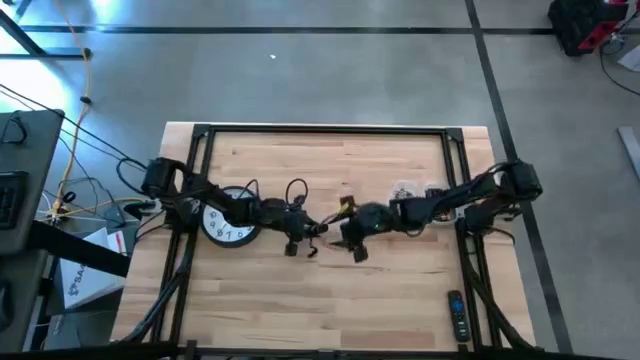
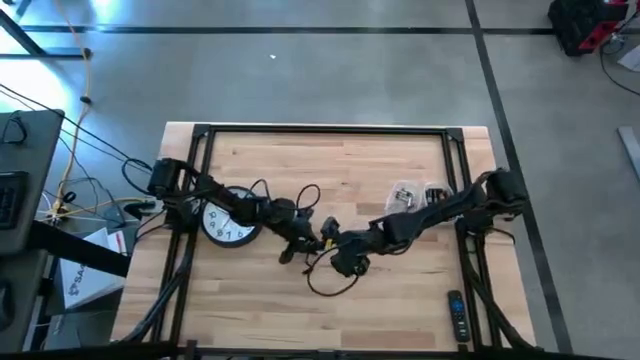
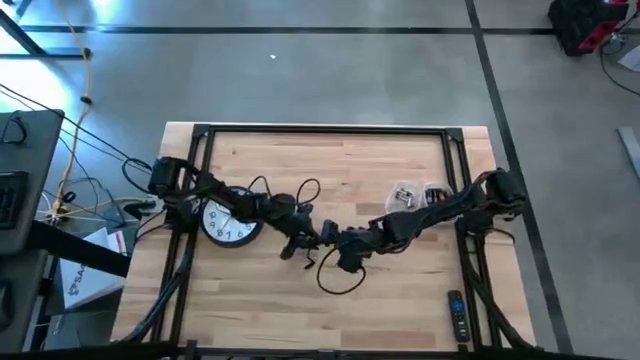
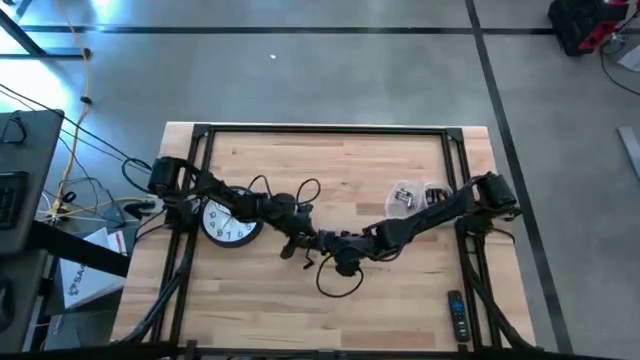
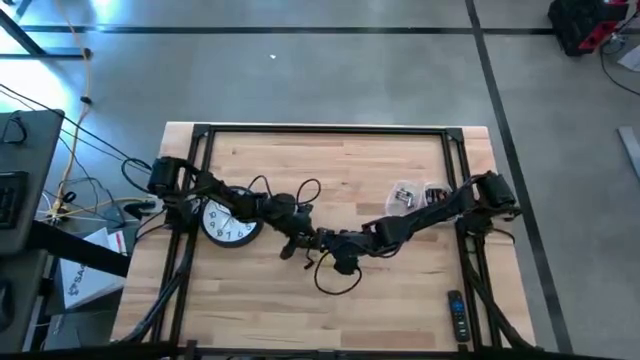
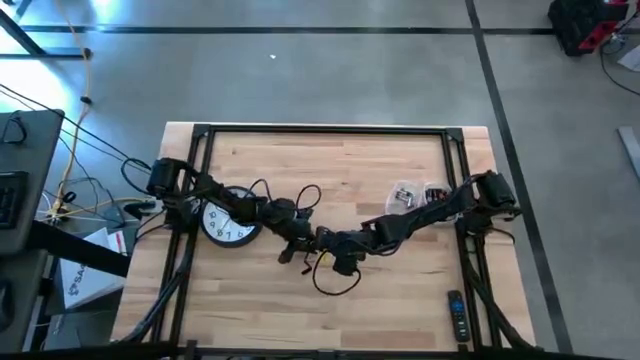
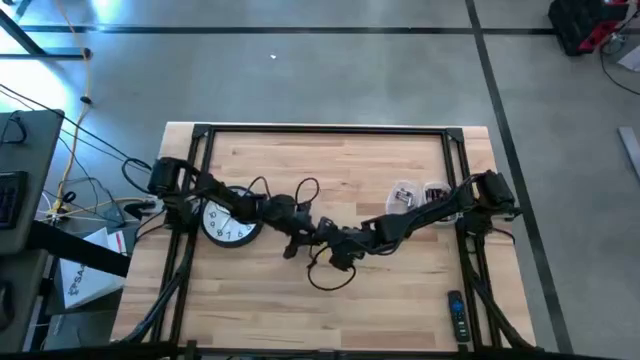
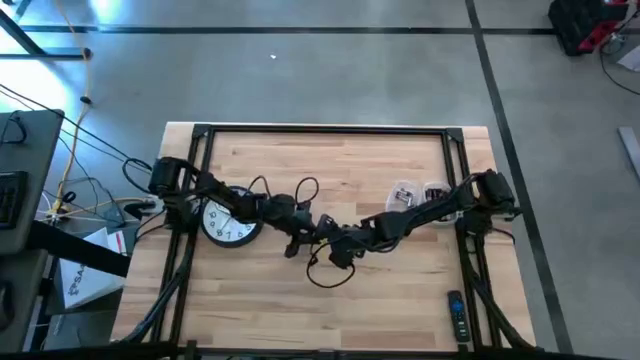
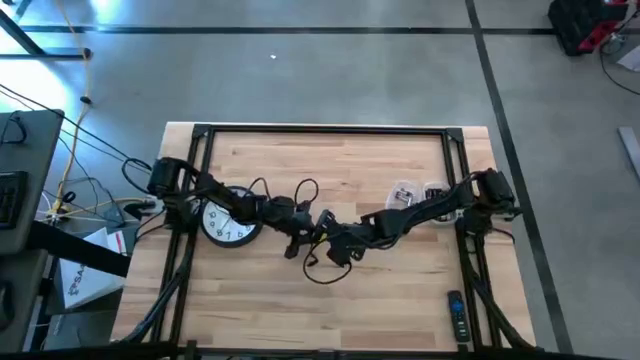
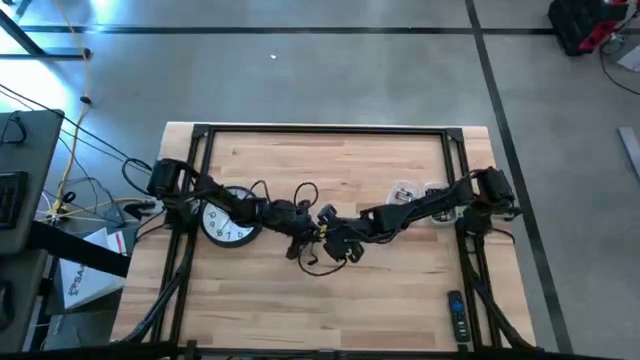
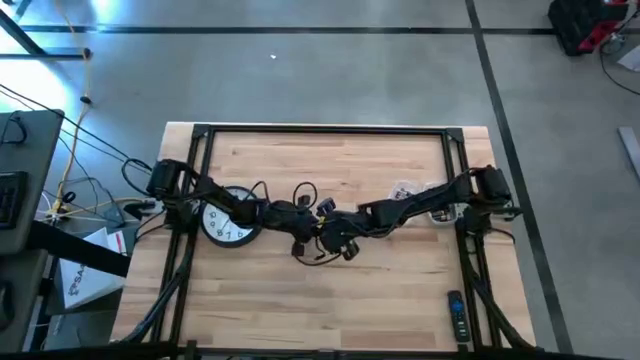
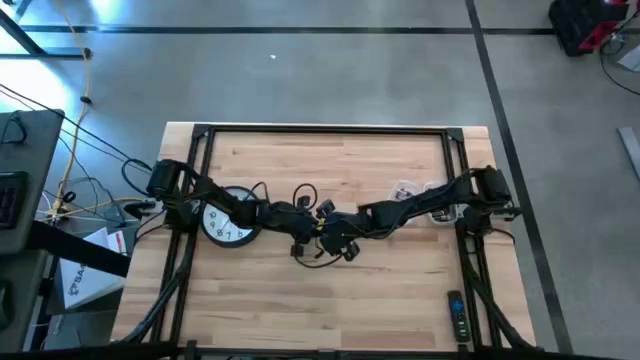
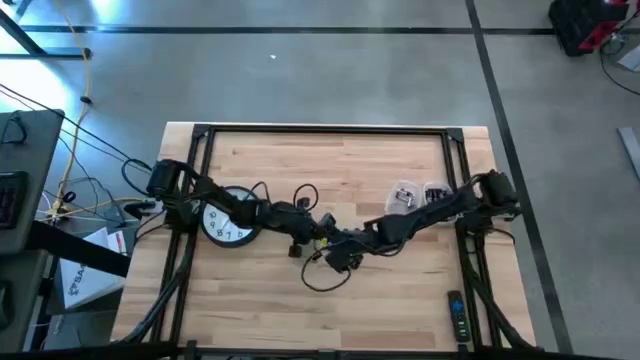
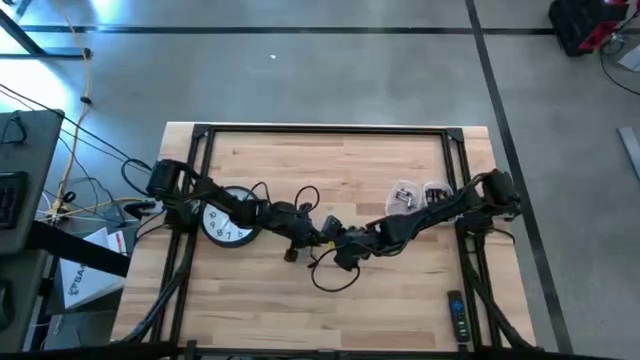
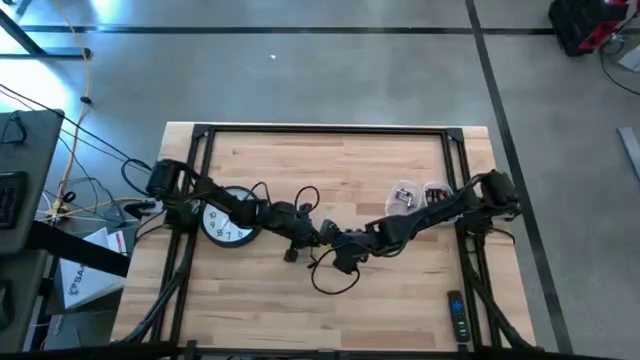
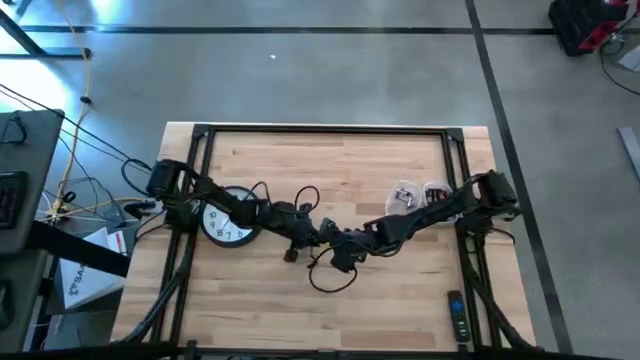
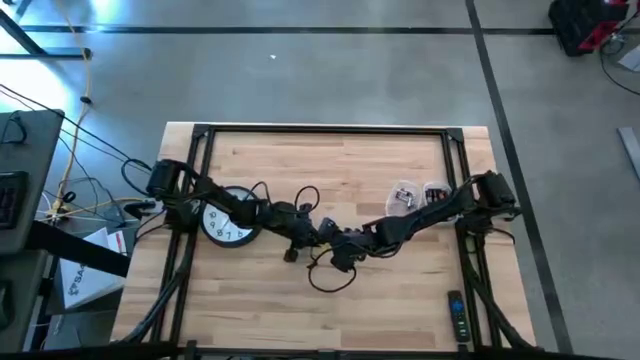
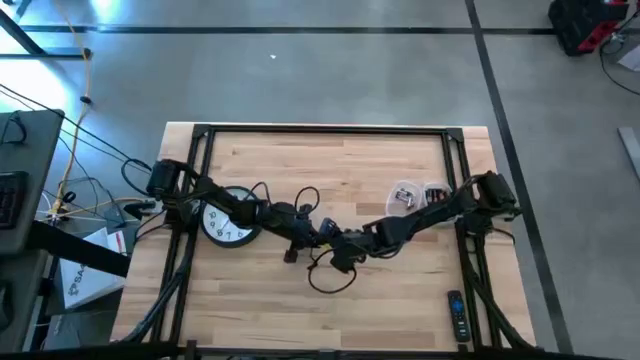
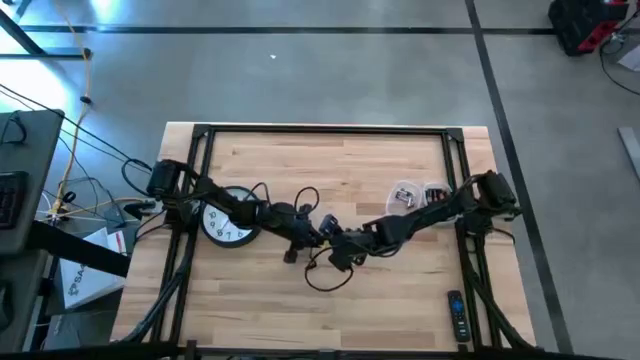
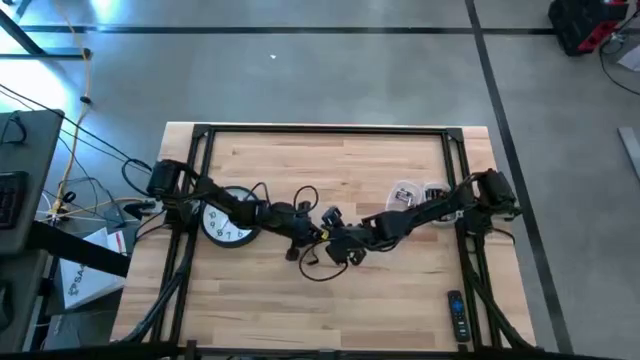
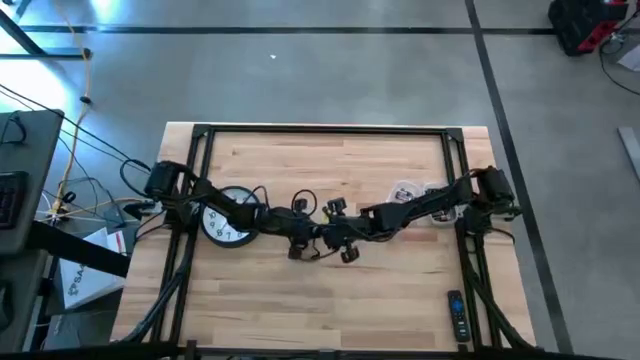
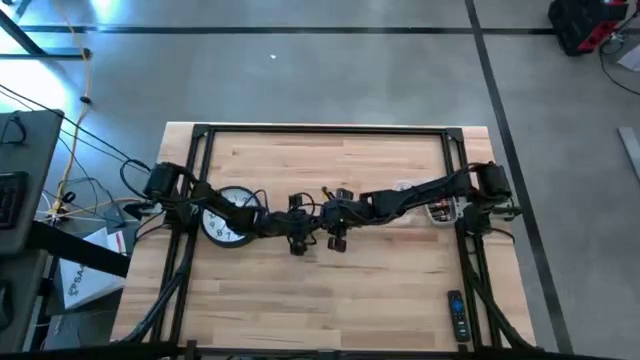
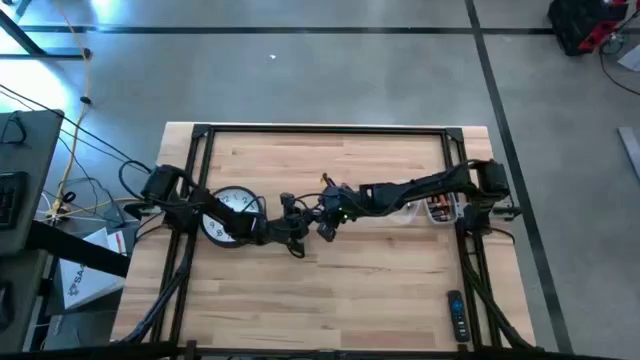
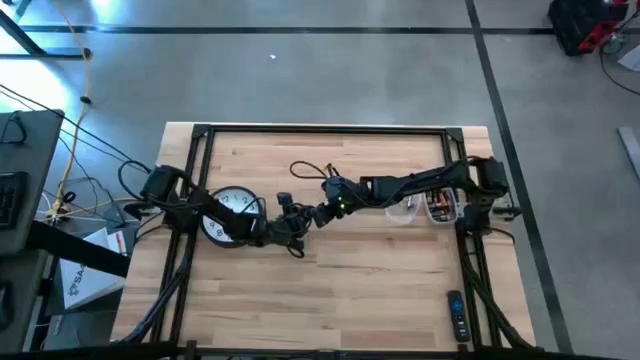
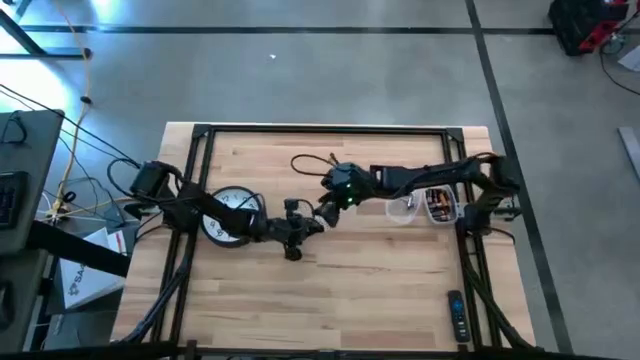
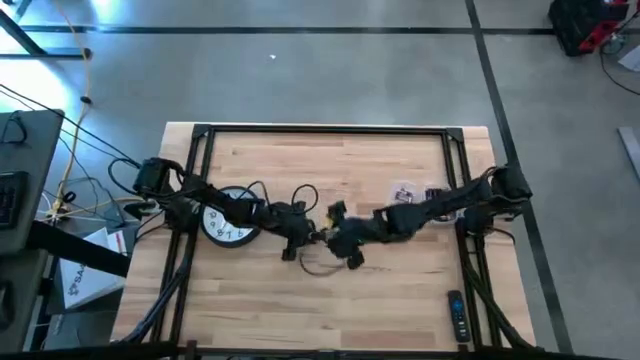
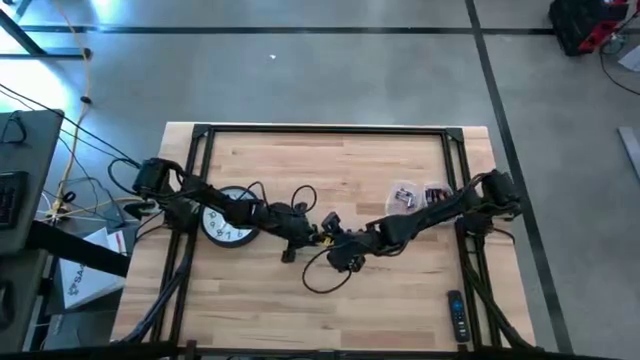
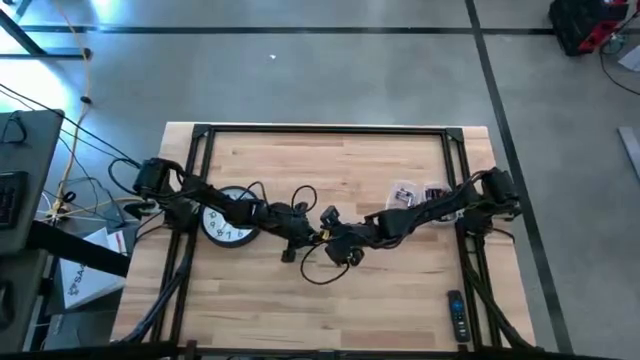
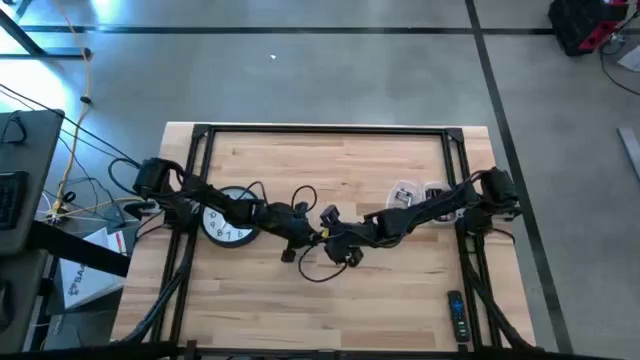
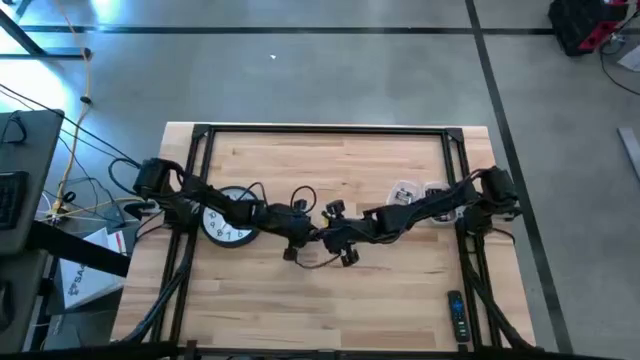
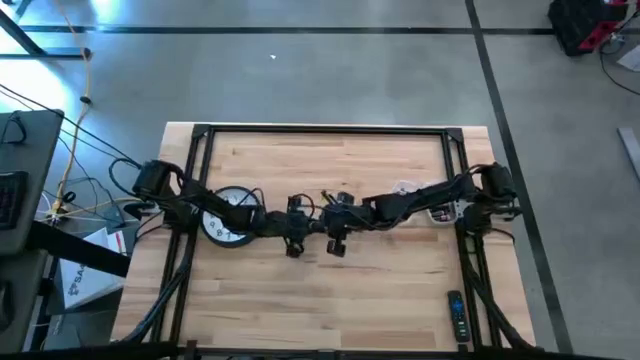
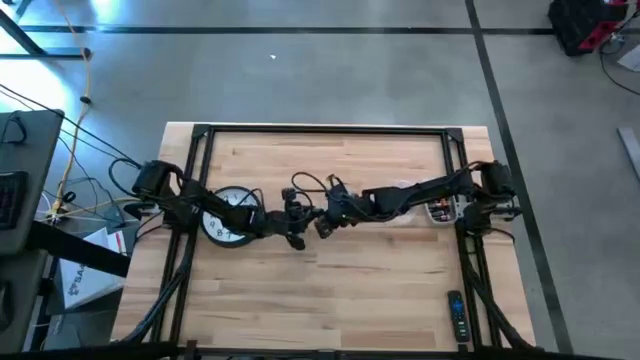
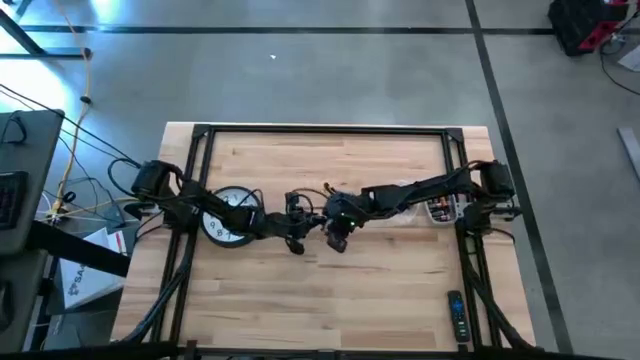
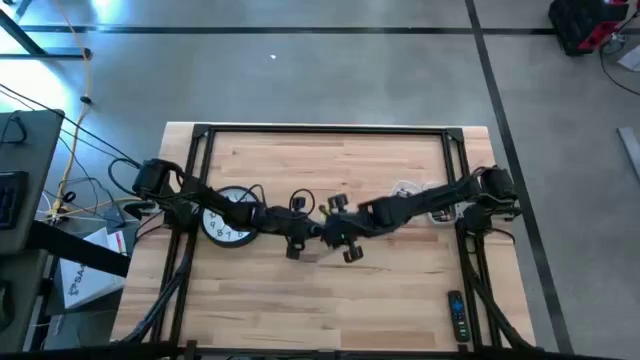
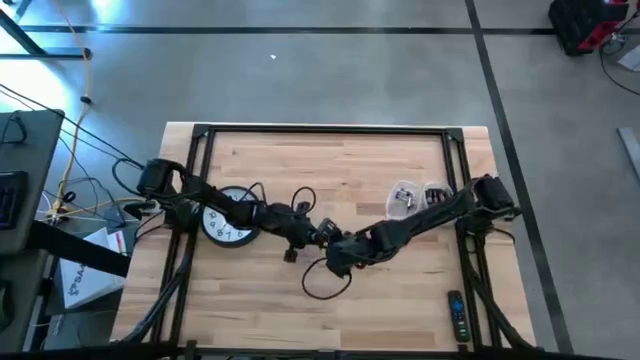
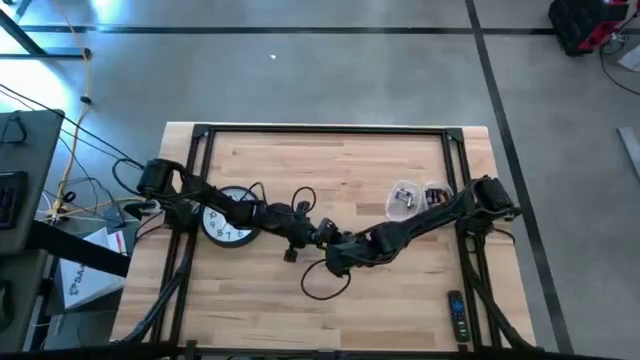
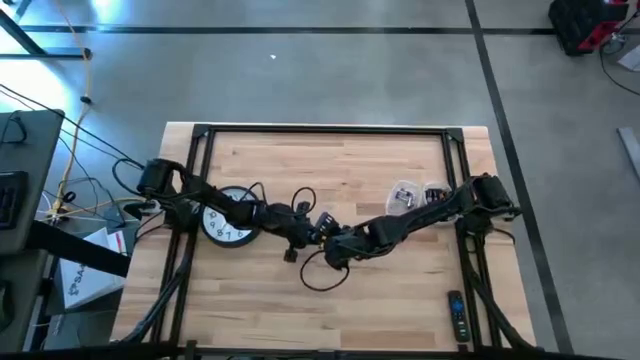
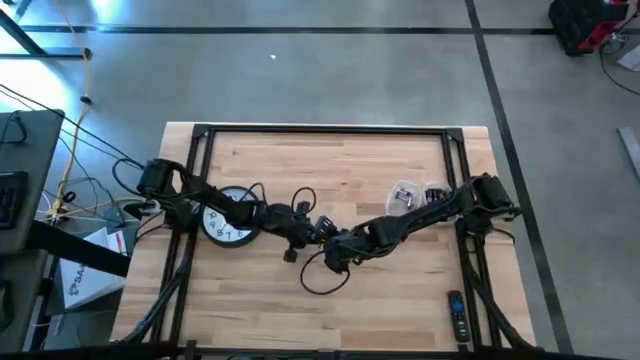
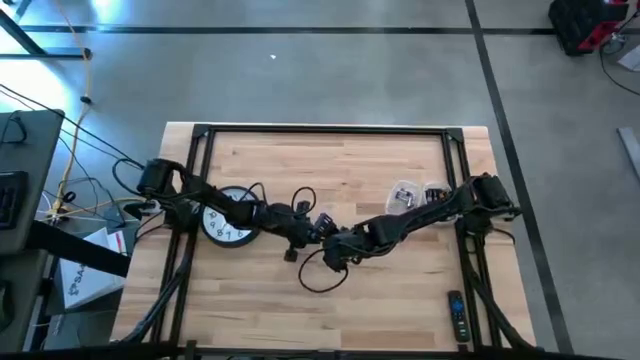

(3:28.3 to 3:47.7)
Task: Insert battery
Close the black flashlight lid
